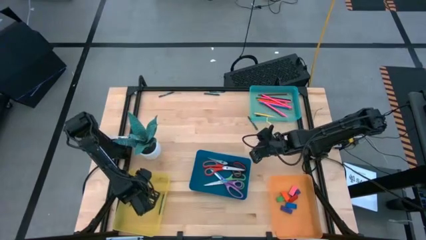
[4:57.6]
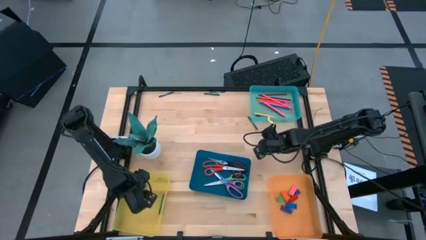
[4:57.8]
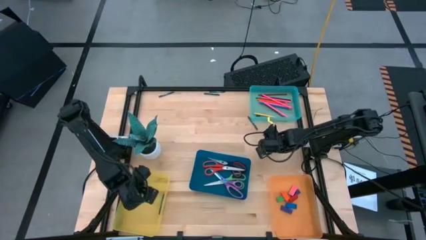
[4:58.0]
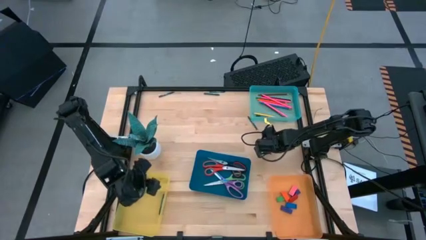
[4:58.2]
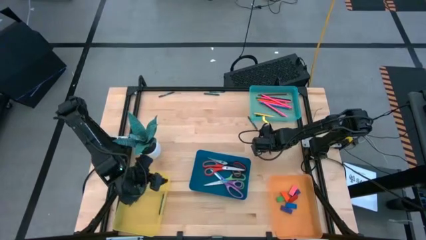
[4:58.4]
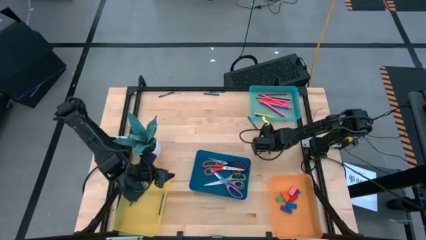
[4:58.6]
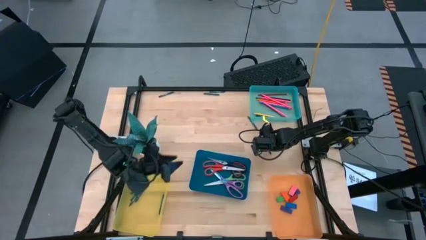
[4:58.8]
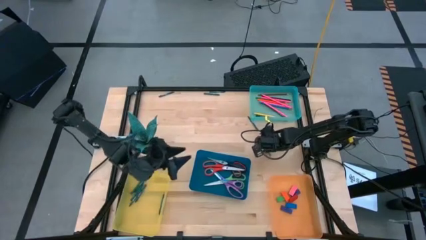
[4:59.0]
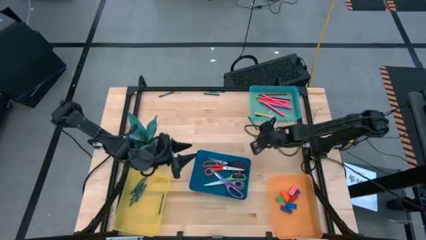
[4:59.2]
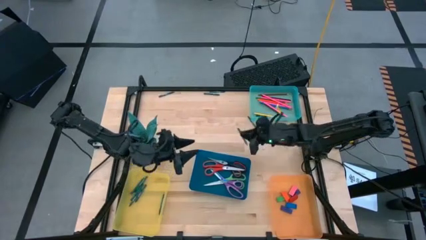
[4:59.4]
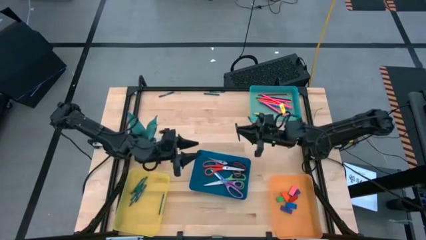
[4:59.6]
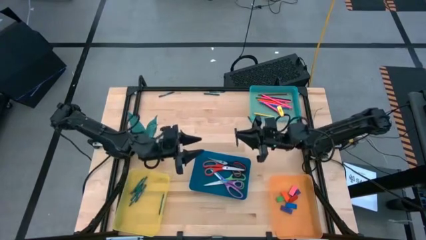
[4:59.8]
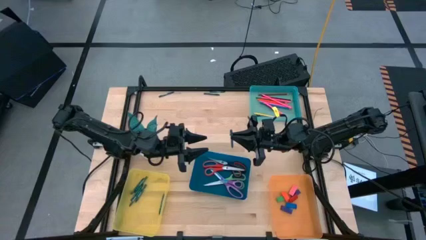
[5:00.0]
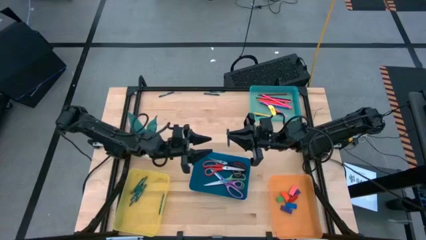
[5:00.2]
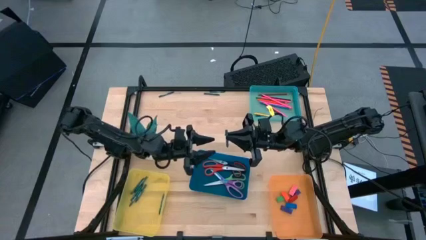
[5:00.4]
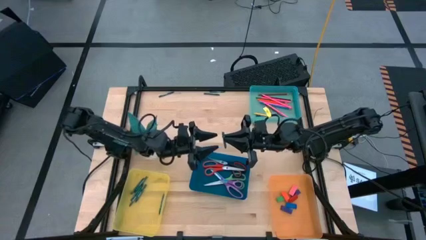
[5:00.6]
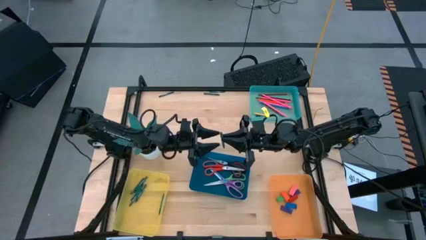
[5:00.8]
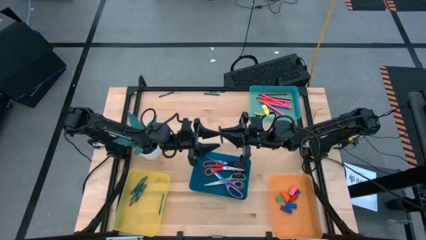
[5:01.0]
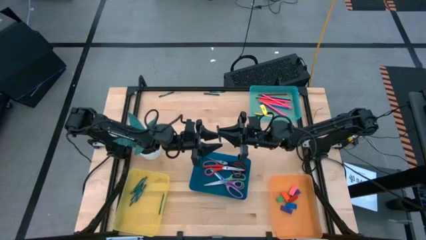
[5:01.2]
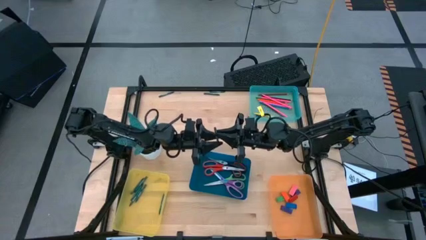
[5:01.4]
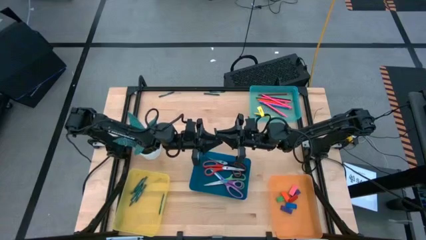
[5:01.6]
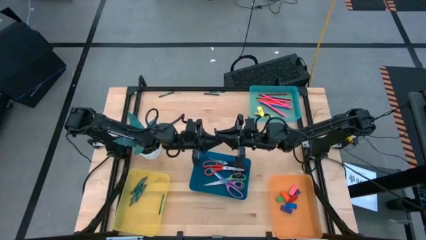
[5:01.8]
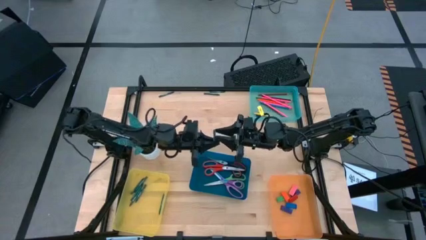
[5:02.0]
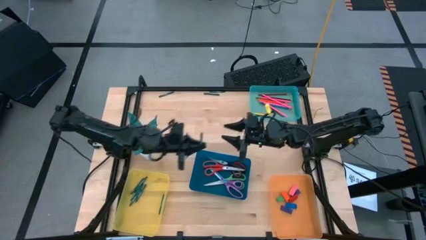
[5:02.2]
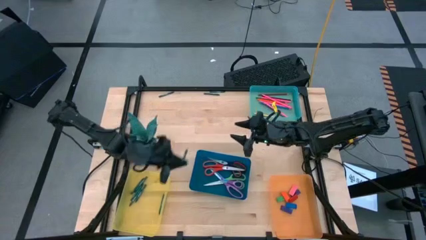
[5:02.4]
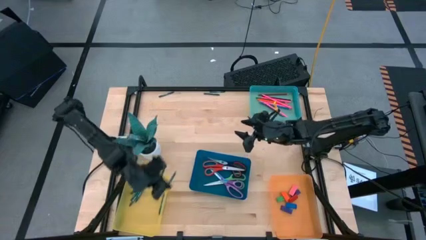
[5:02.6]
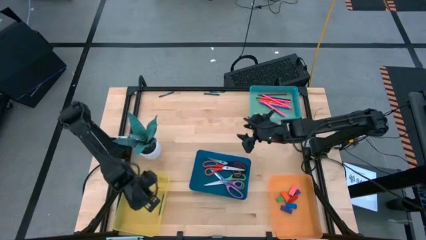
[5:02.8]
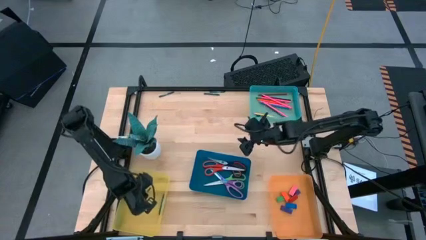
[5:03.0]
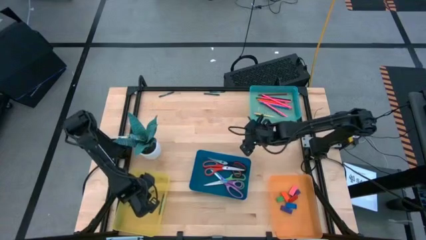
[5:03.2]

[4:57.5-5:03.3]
Task: Sort crayons/erasers/pens/pencils in bins
Put the green crayon into the yellow bin

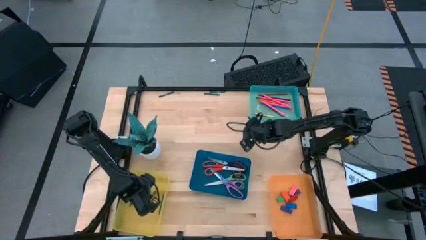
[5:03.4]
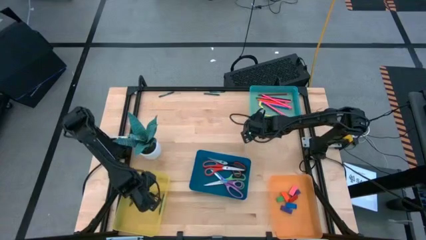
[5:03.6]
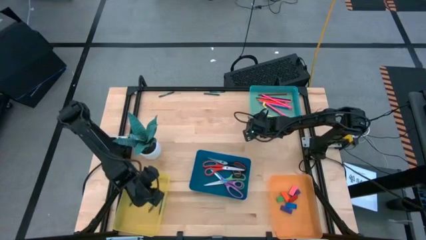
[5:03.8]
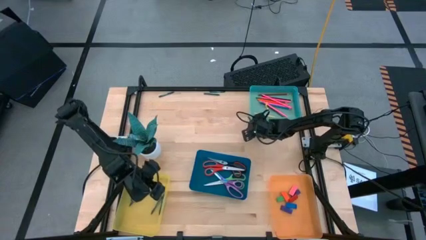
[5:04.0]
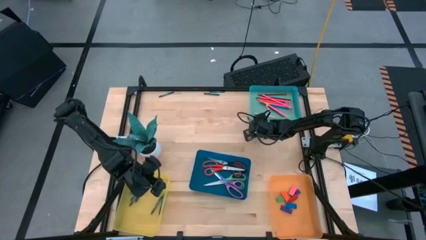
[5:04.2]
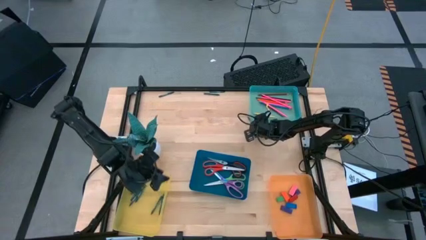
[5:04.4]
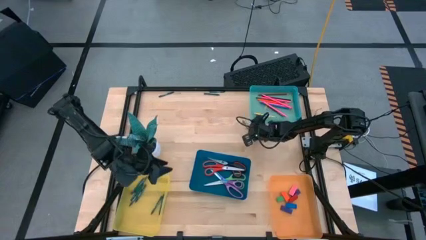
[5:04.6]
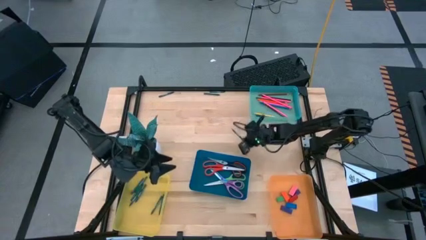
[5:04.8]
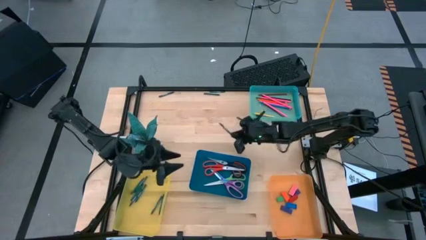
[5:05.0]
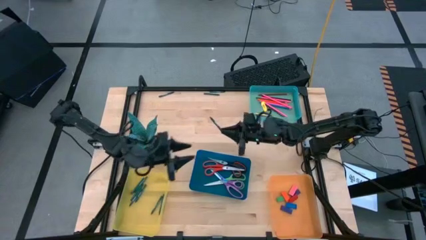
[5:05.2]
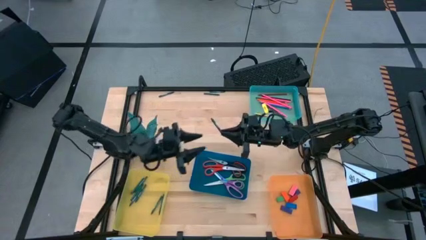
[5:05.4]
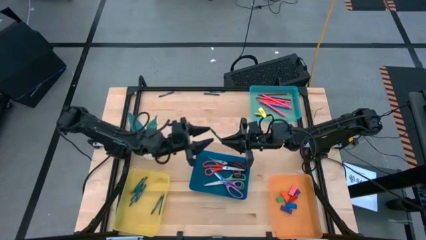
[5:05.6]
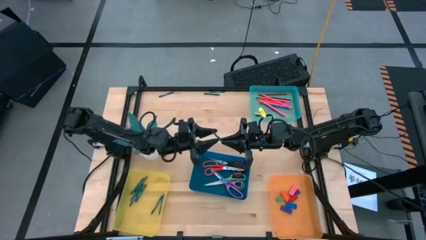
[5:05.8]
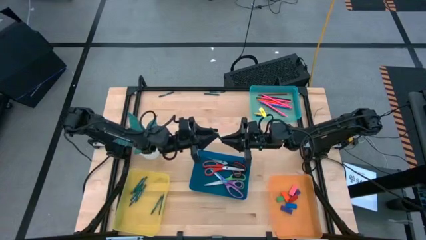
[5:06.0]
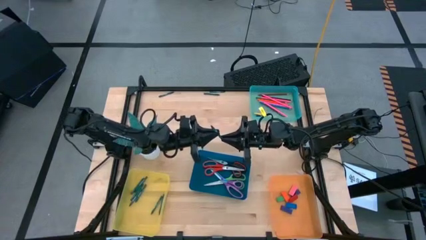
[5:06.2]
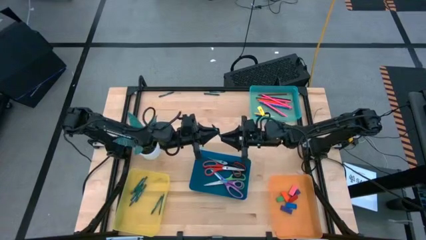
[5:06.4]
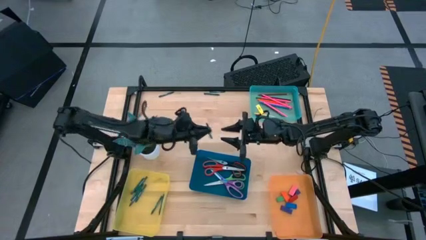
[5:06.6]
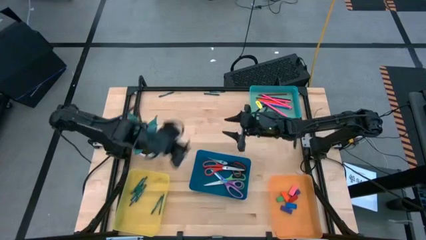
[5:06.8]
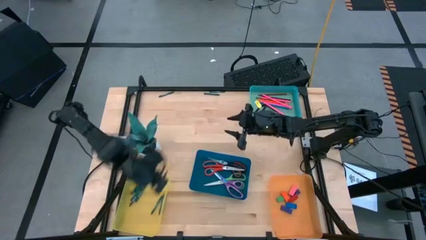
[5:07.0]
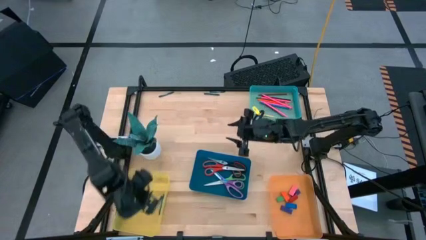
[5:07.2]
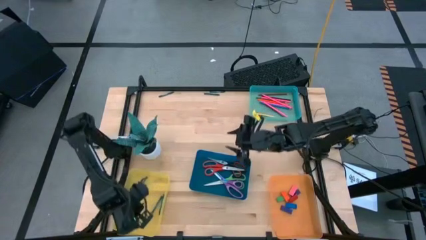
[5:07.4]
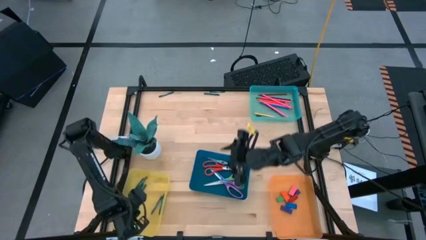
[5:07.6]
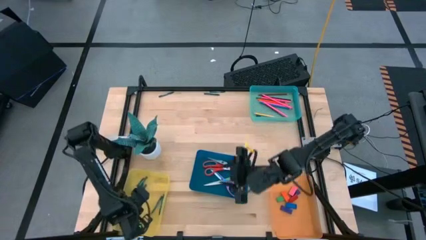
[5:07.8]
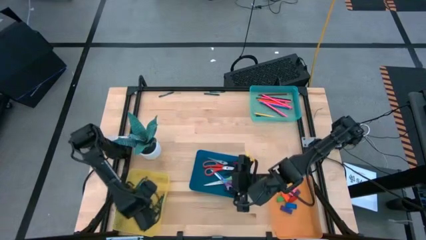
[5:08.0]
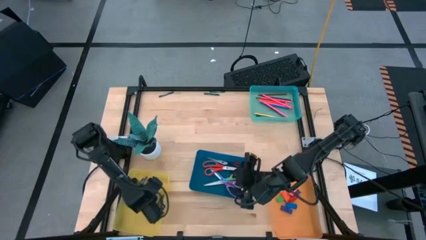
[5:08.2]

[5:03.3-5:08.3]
Put the green crayon into the yellow bin

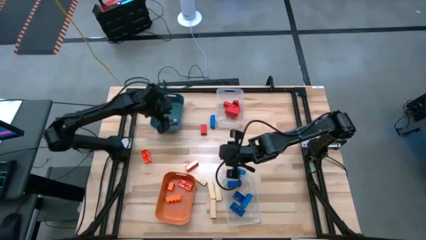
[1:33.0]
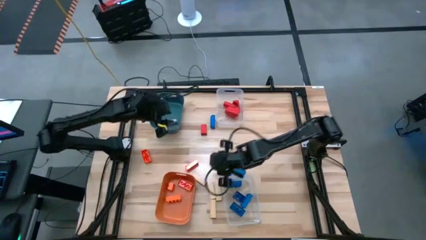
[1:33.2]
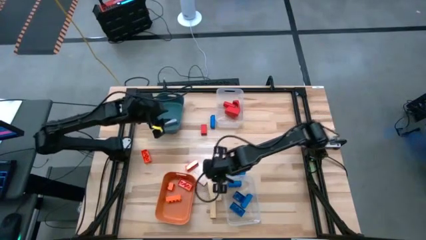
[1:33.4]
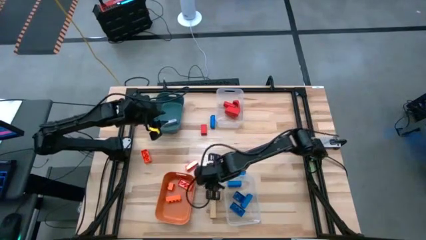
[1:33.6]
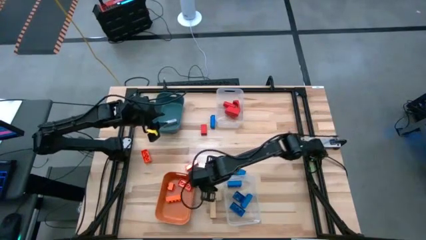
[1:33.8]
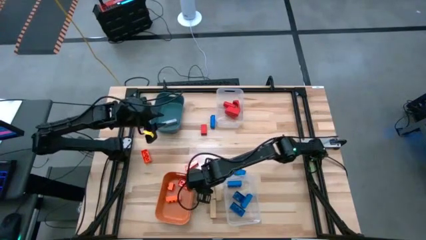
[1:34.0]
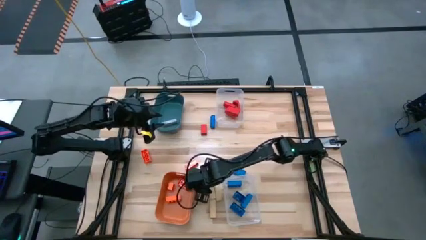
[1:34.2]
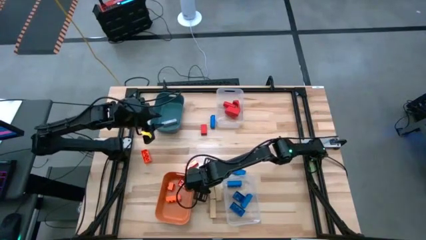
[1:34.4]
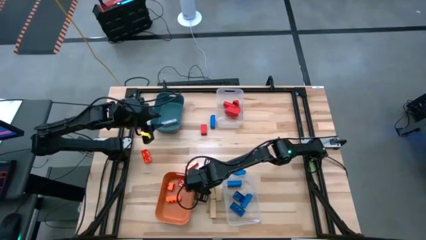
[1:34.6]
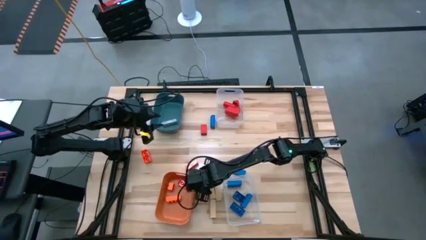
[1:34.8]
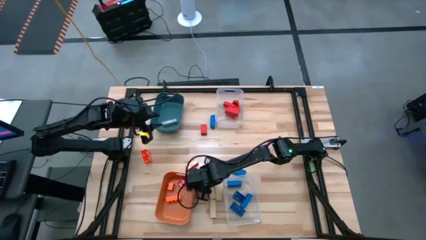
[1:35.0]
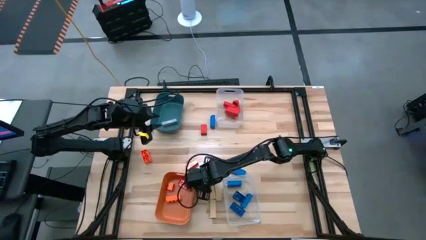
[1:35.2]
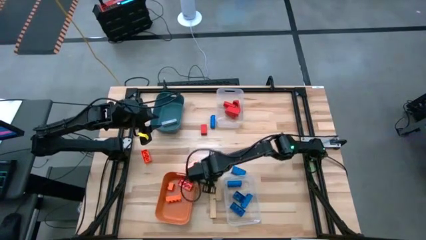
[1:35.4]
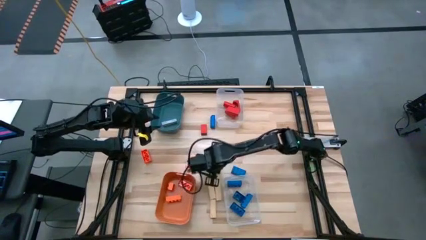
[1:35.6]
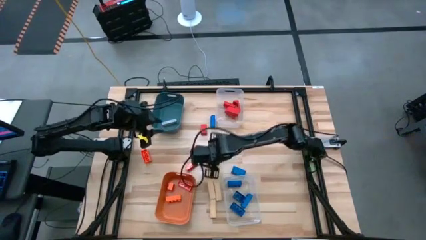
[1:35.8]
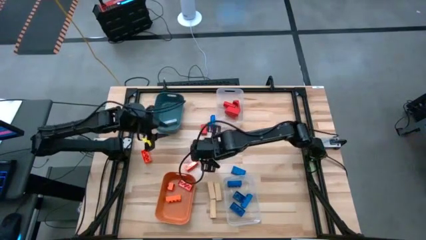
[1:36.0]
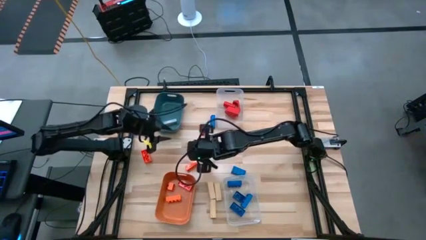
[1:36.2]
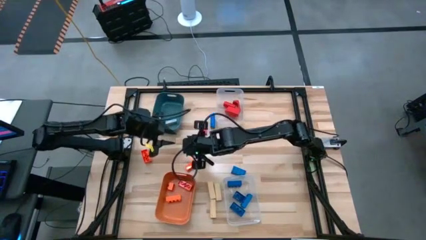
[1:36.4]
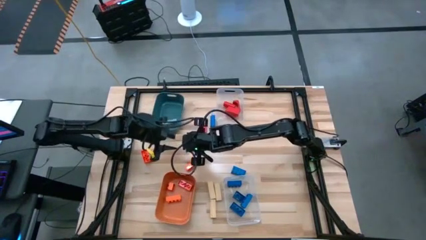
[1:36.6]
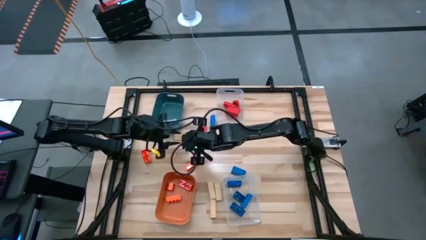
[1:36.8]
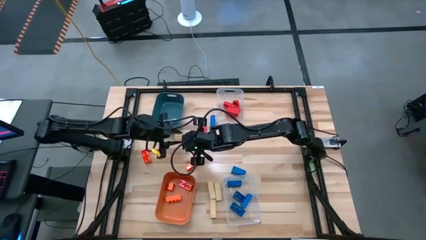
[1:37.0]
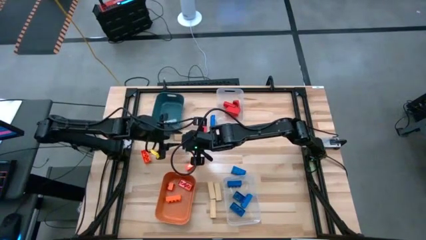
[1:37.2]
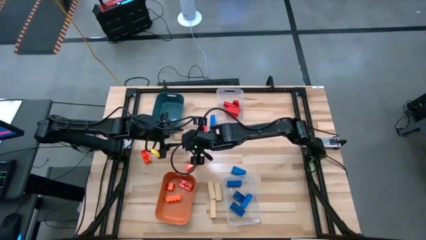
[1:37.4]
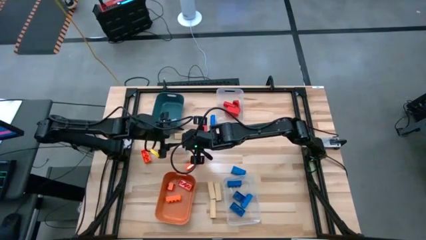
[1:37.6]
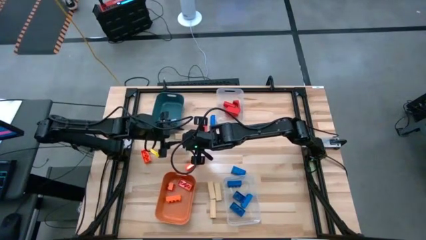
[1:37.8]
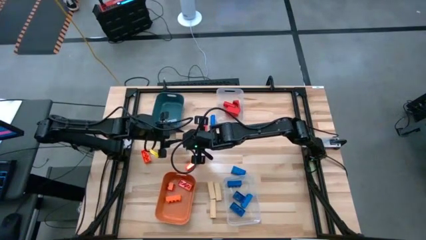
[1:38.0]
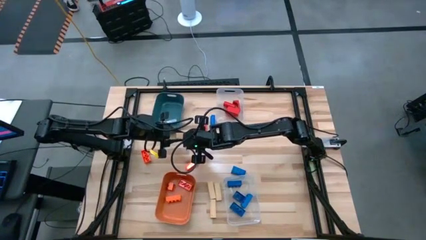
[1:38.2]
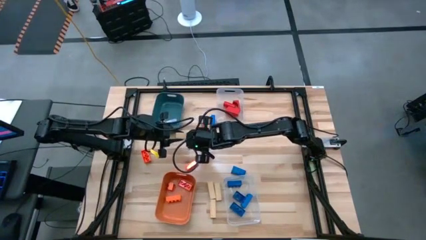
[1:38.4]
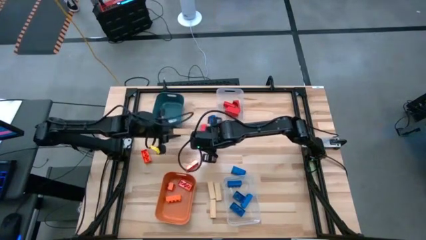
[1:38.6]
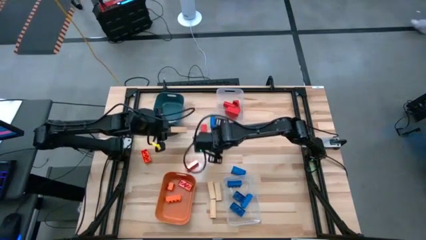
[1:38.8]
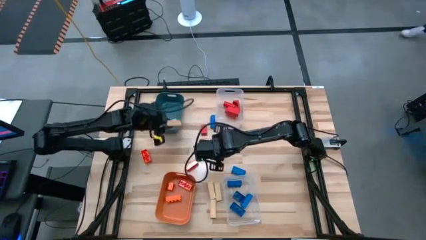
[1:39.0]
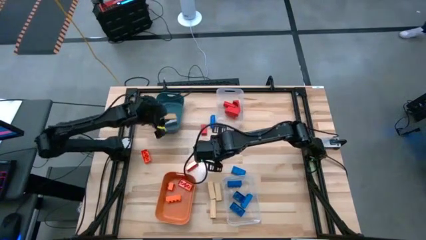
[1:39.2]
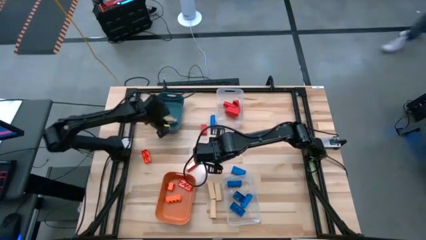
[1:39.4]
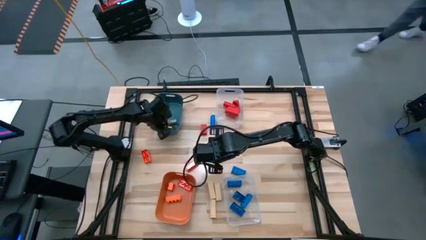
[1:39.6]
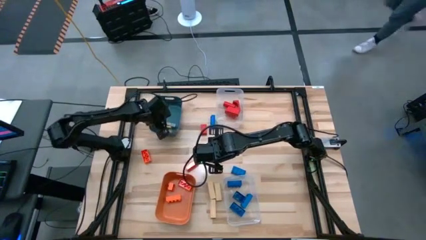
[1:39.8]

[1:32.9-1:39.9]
Task: Sort blocks
Put the brown wooden block into the blue bin
